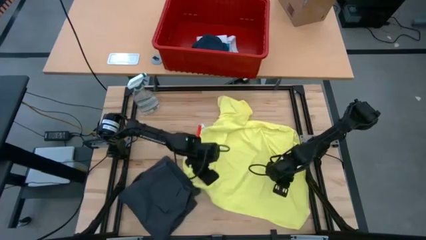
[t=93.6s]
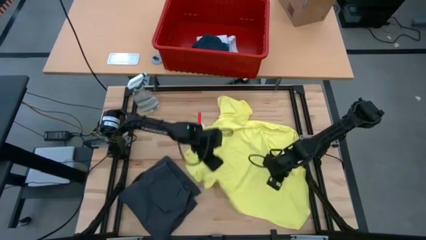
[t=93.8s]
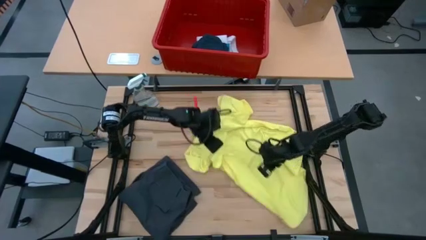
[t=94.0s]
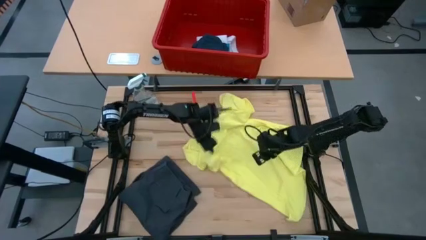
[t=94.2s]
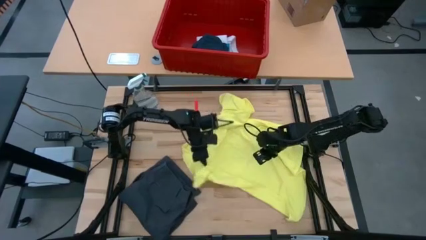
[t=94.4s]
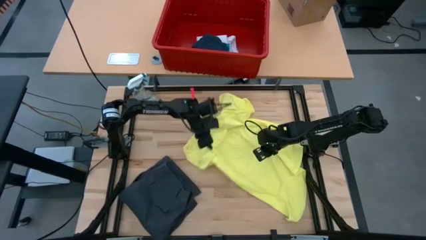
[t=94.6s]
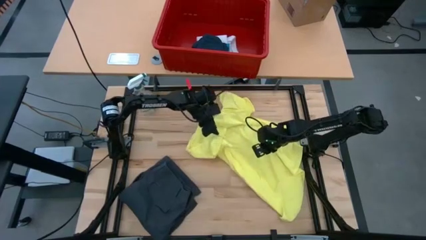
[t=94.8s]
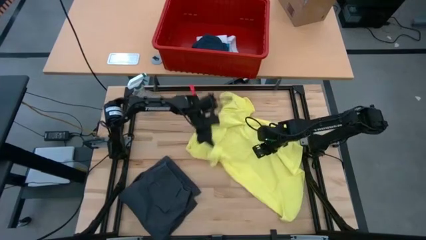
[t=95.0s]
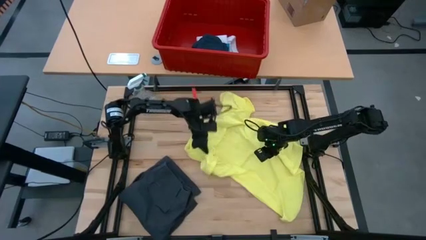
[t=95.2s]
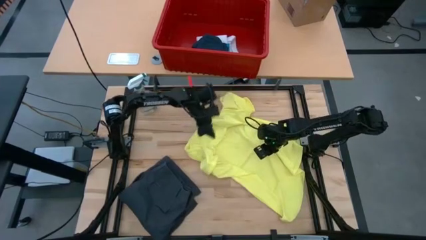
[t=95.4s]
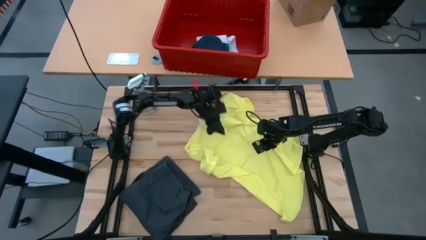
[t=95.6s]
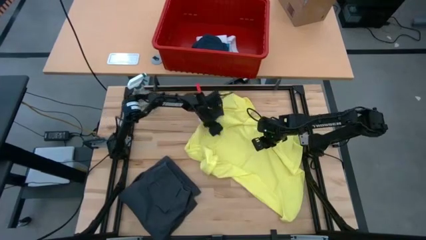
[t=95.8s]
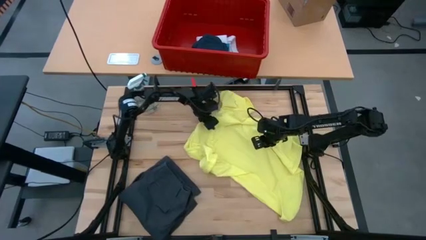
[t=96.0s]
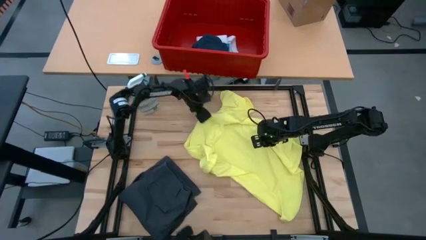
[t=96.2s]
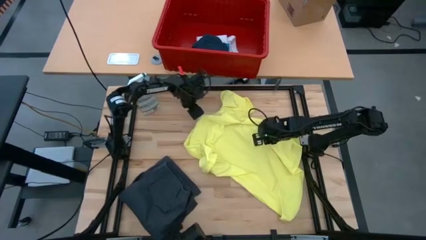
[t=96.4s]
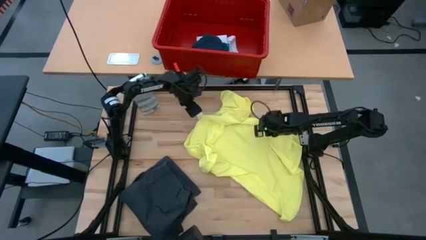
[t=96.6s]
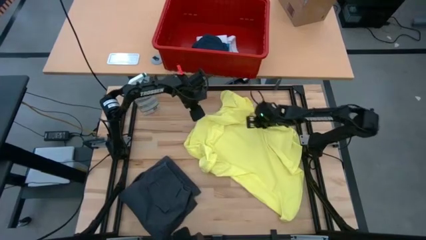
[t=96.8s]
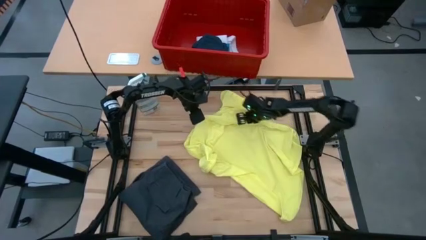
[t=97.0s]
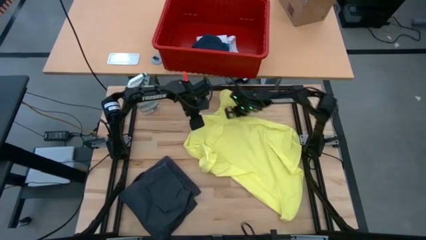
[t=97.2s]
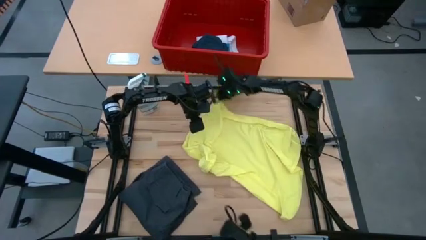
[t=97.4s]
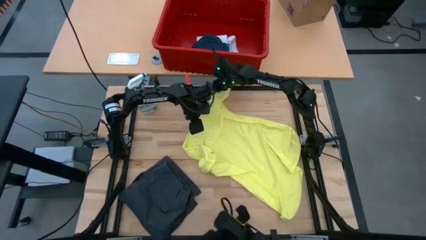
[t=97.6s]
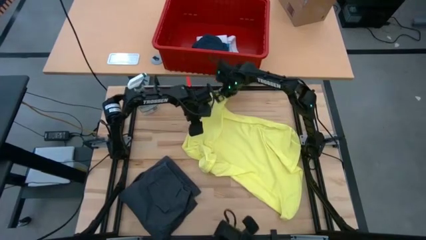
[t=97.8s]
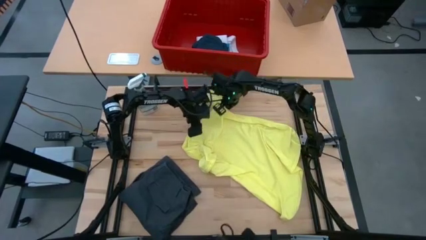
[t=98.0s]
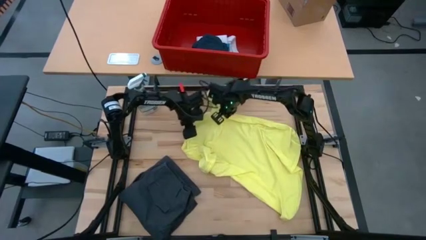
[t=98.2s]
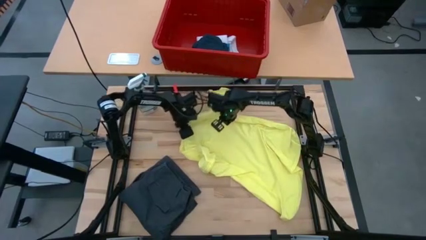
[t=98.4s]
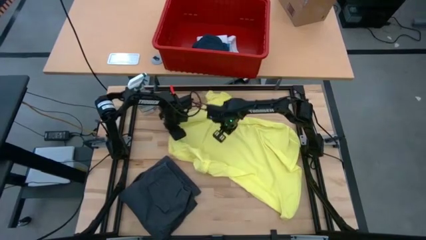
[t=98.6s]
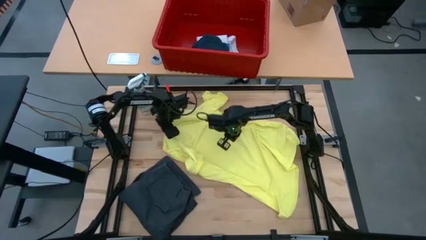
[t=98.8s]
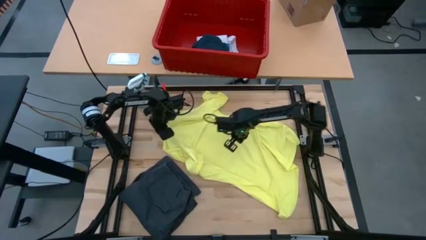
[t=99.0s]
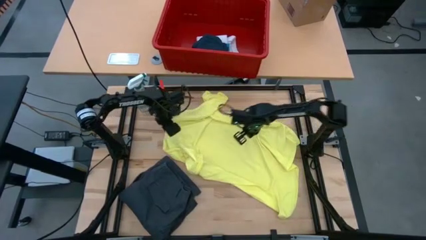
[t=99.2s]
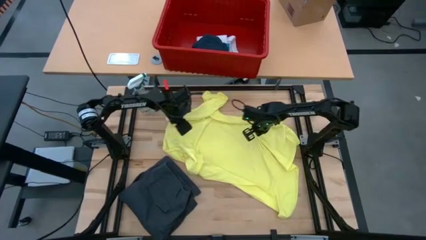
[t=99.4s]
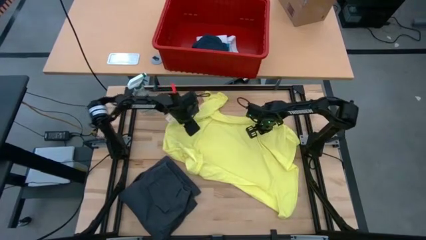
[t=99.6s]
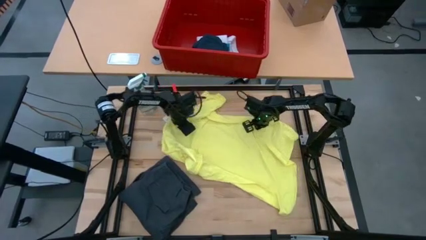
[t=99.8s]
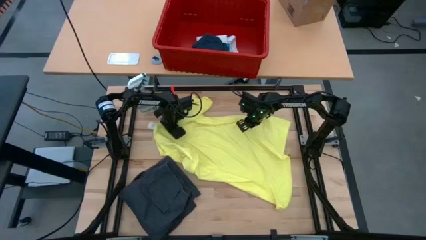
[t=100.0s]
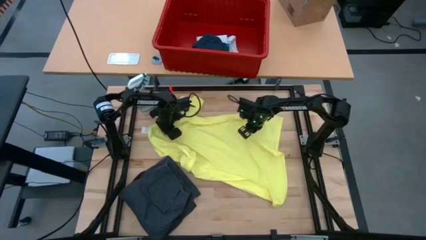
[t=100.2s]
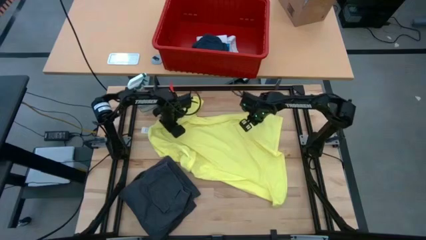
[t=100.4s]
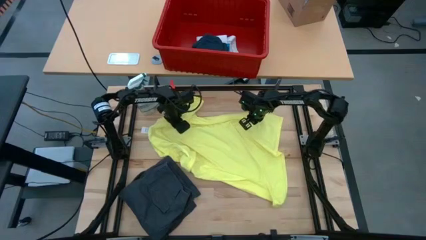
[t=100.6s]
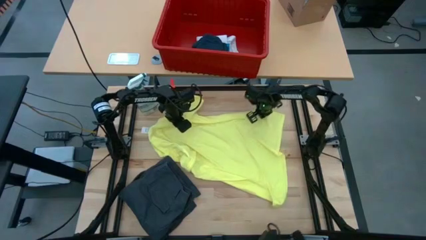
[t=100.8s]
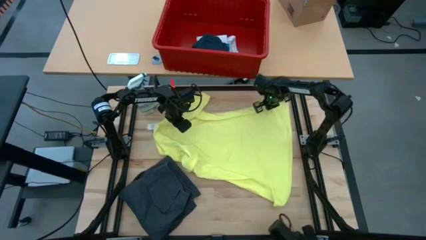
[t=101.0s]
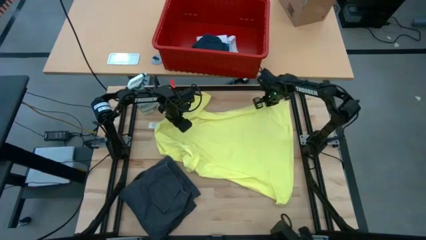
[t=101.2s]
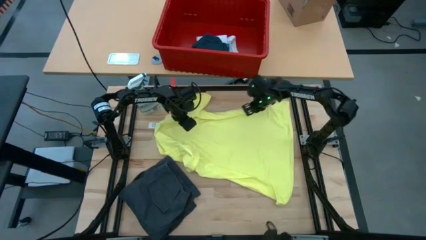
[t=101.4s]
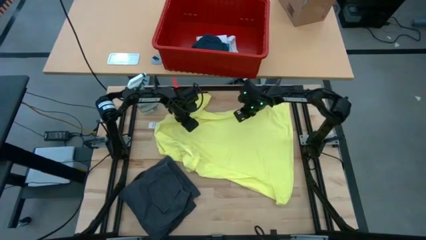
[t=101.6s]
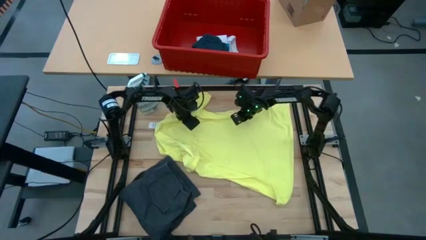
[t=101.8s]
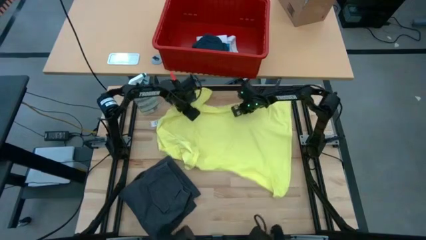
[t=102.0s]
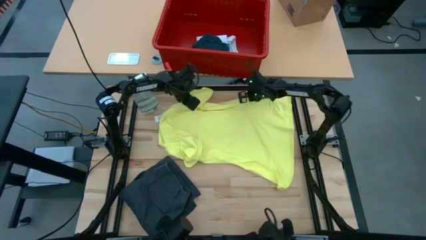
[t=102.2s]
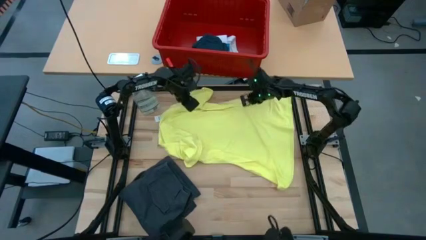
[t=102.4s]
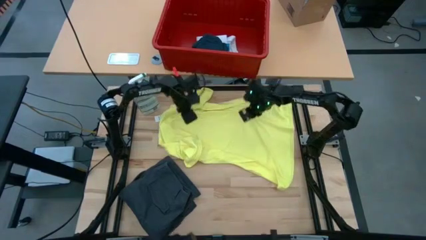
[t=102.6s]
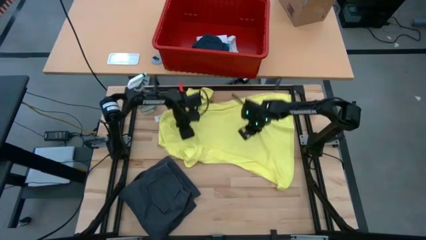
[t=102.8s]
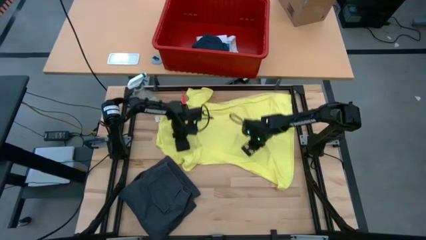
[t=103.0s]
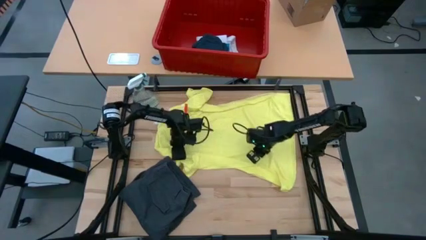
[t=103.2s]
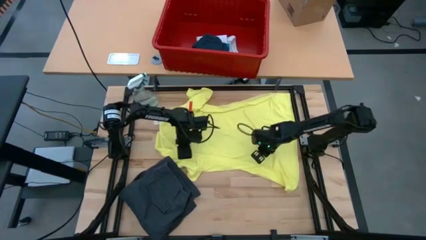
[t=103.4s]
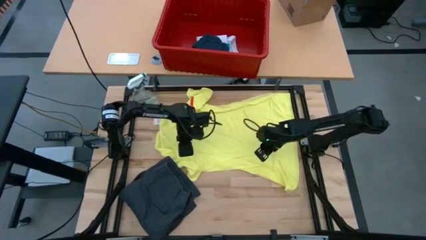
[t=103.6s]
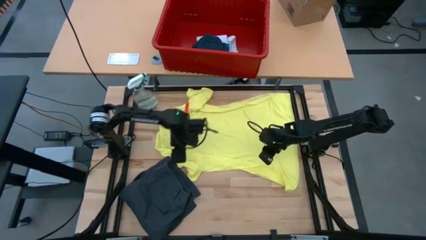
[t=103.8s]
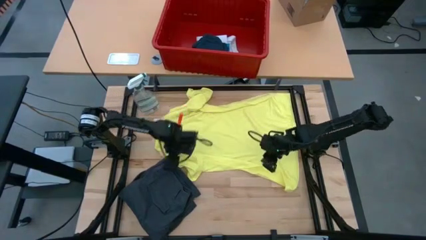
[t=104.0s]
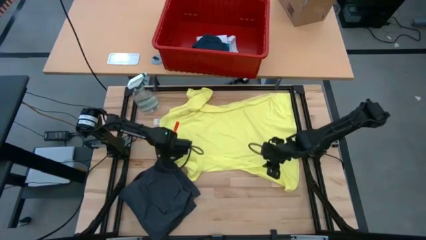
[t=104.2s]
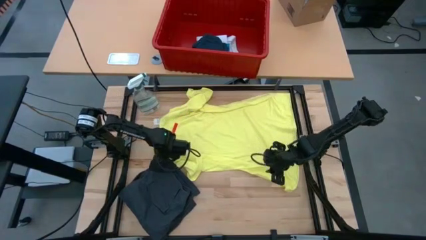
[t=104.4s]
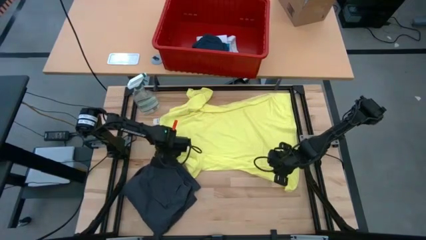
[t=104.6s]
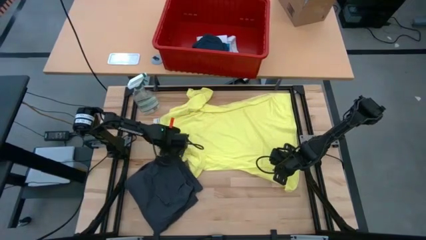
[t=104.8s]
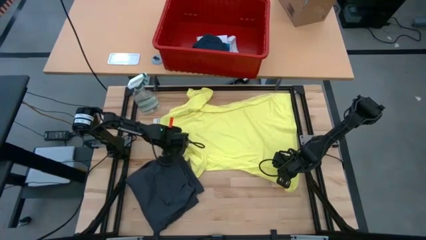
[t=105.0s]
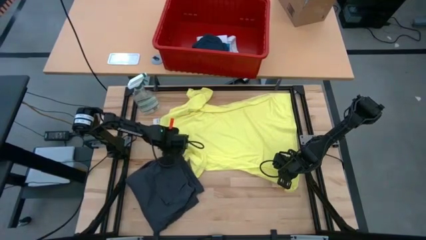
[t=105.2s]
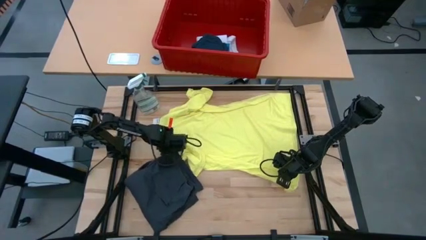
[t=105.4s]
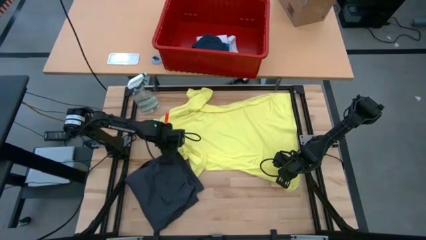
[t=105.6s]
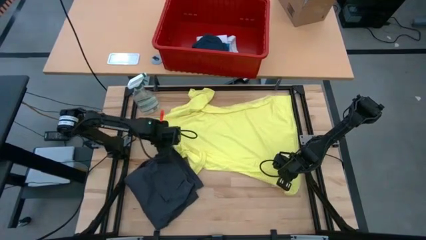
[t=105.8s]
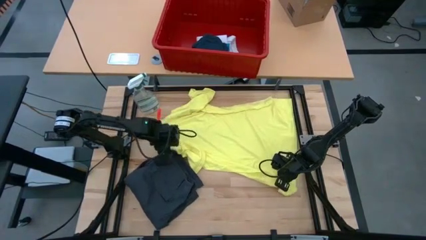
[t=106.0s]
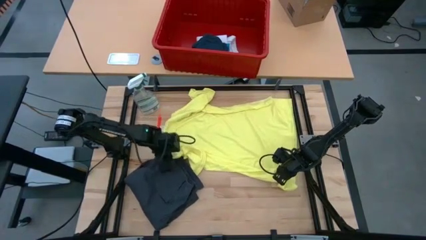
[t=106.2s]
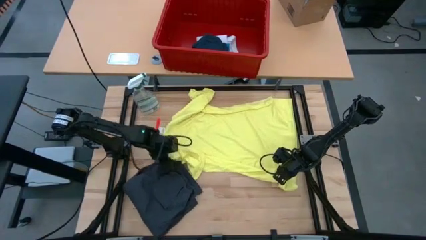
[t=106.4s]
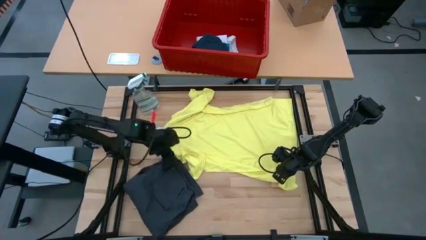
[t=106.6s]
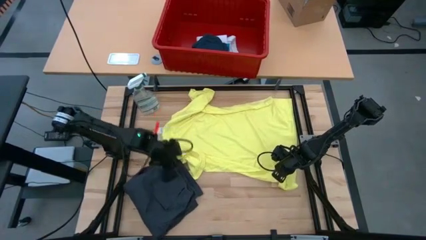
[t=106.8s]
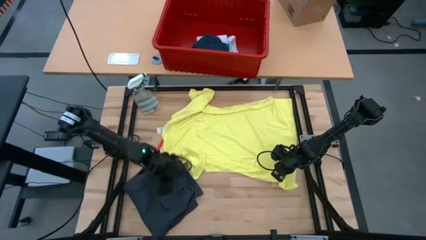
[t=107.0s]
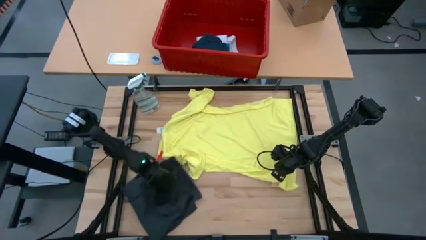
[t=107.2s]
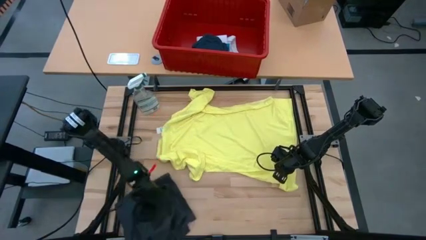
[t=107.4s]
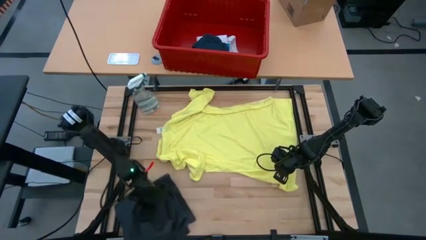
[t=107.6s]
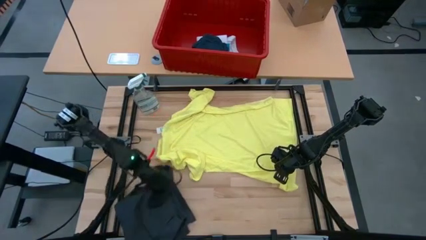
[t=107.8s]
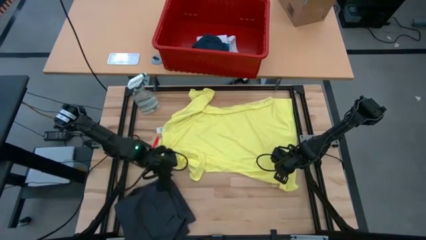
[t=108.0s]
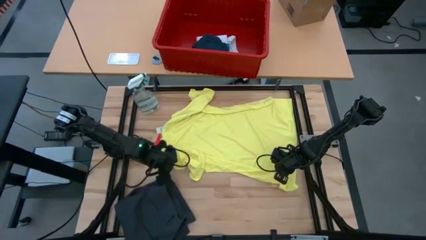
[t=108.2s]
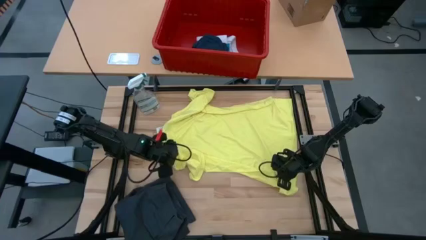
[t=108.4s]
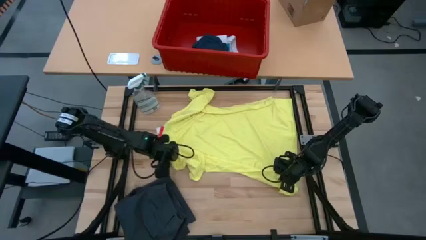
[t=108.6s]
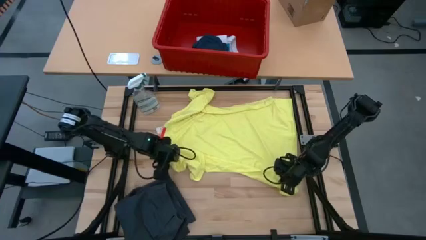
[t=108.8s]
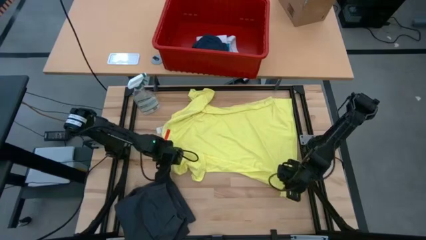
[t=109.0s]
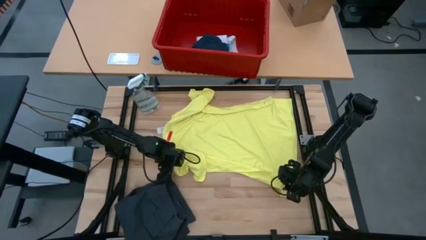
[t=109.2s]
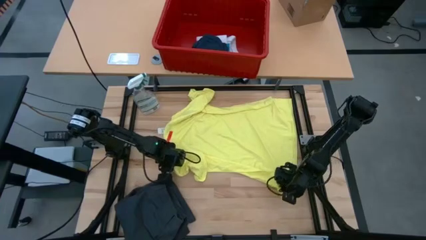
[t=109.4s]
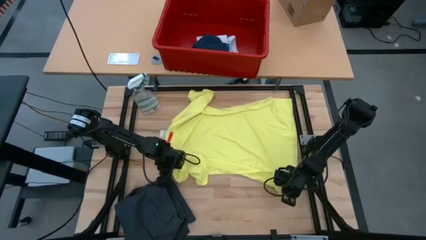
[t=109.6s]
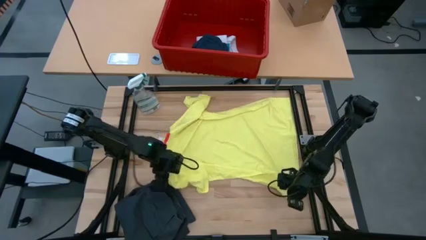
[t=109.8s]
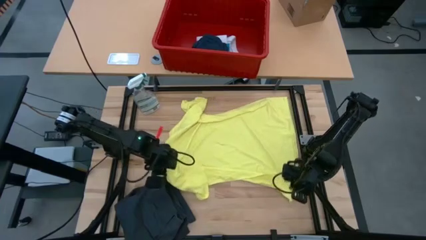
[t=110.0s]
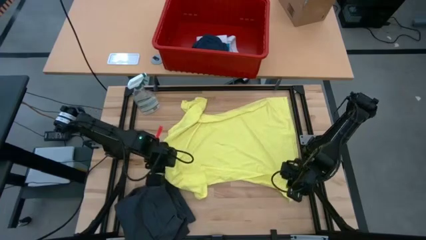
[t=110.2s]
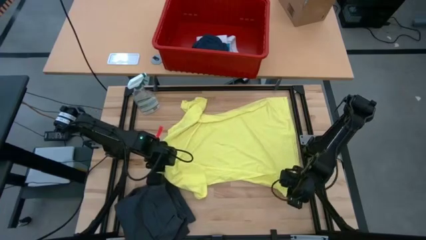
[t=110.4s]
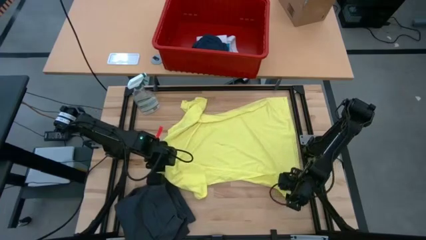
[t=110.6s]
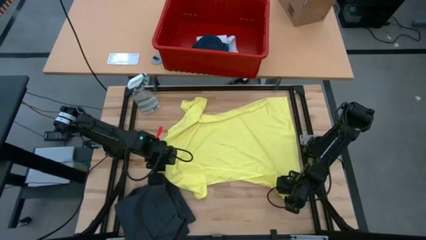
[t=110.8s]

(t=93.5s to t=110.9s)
Task: Fold Laundry from Bin
Fold the yellow shirt
